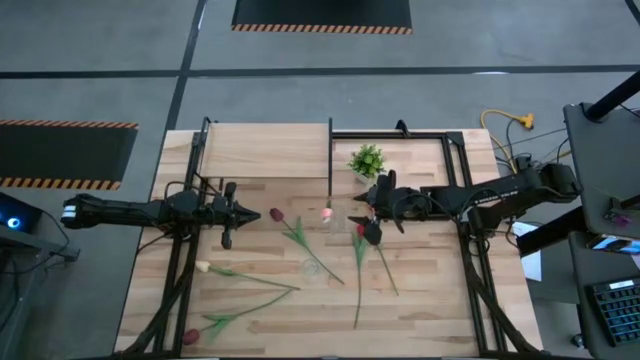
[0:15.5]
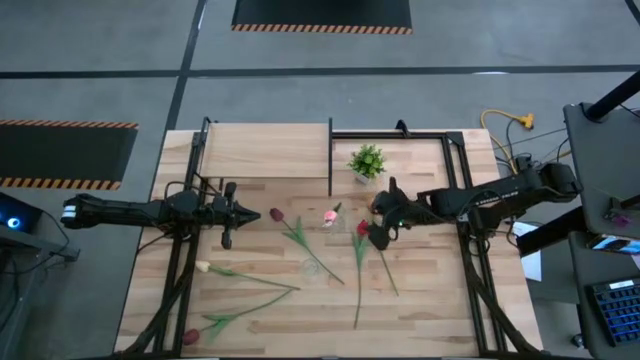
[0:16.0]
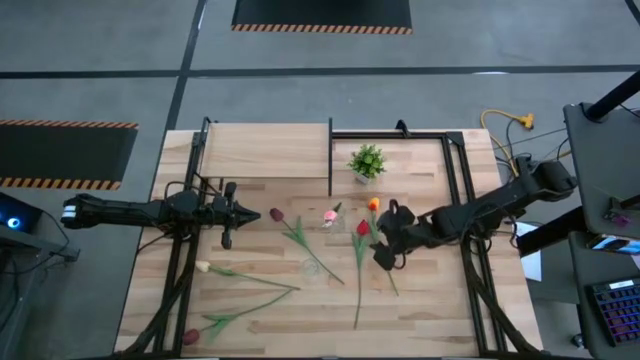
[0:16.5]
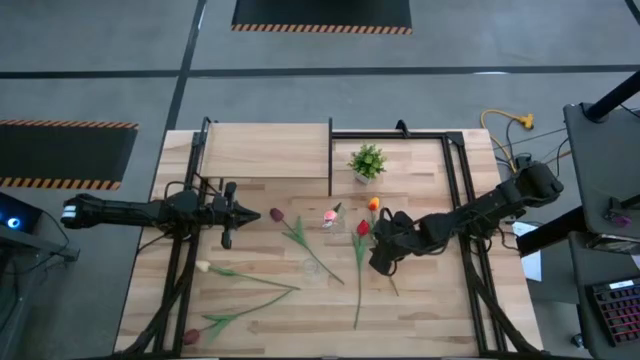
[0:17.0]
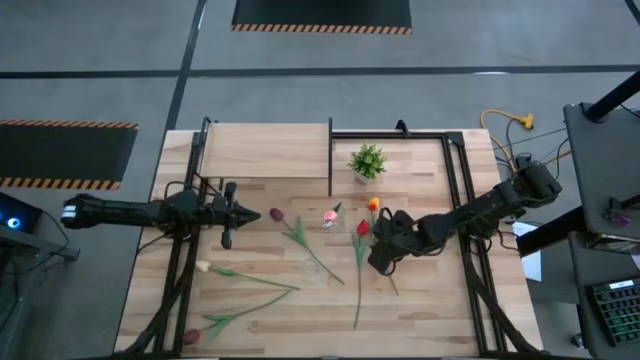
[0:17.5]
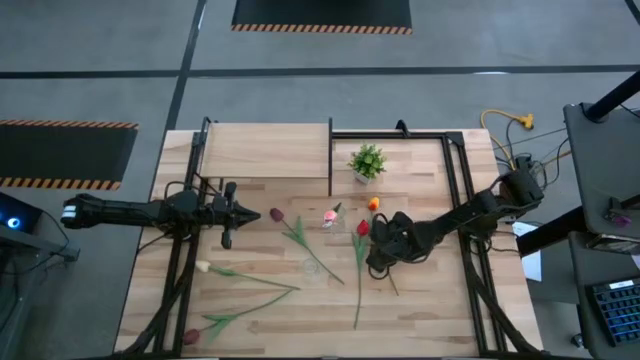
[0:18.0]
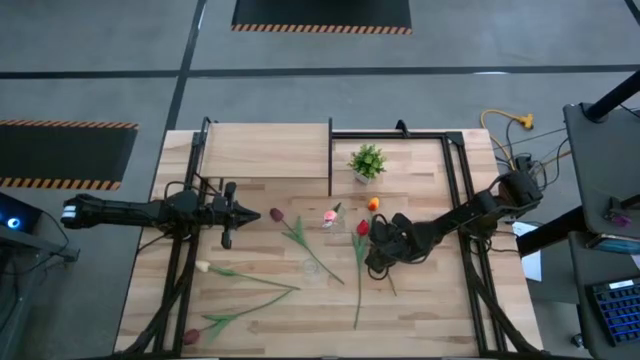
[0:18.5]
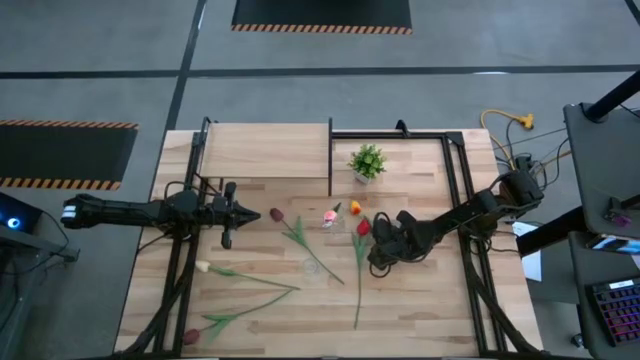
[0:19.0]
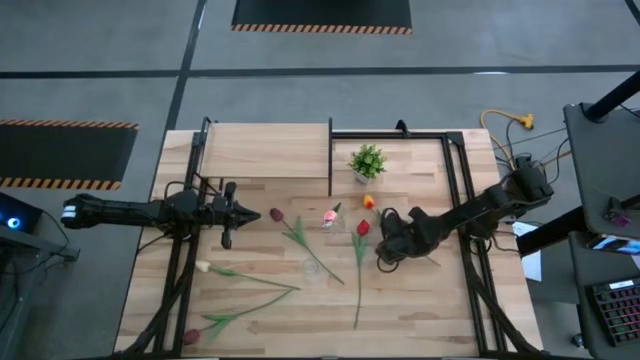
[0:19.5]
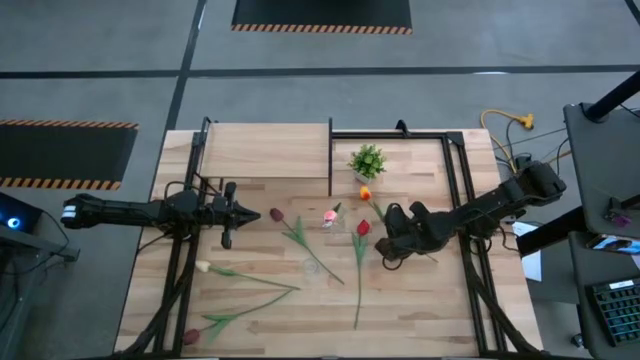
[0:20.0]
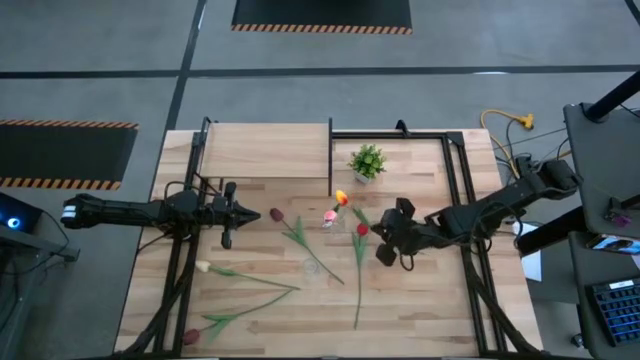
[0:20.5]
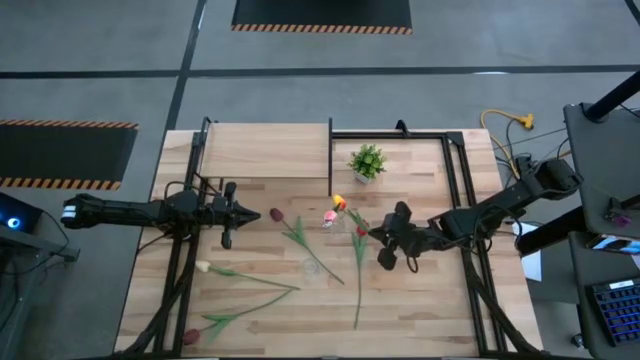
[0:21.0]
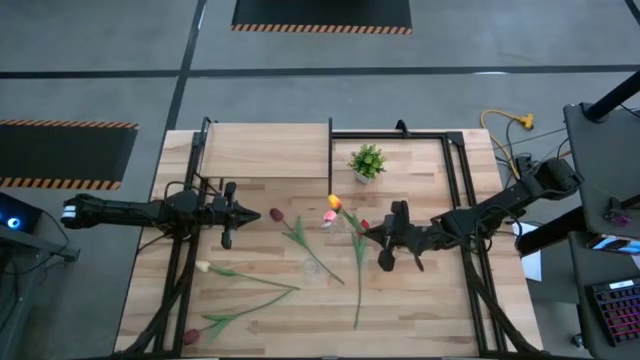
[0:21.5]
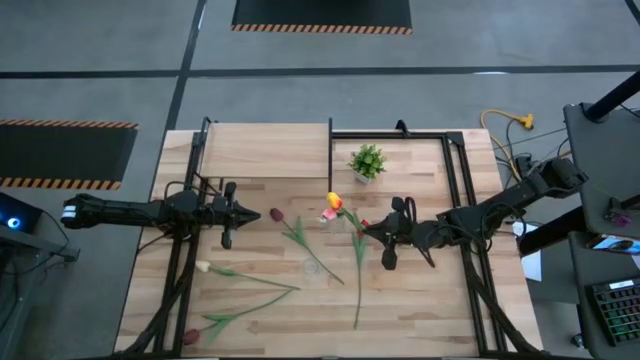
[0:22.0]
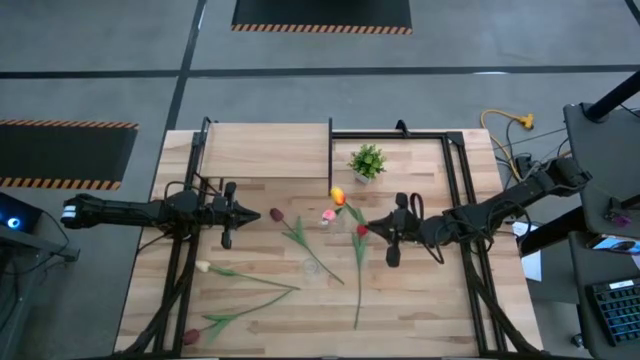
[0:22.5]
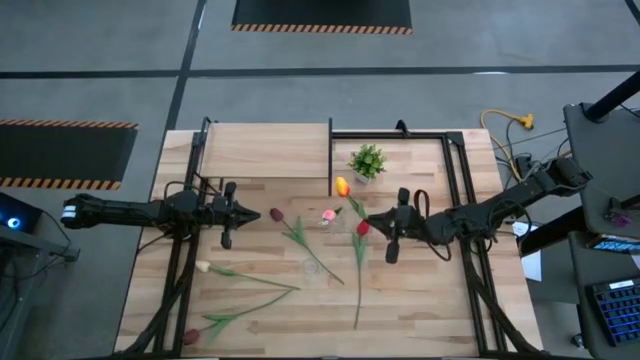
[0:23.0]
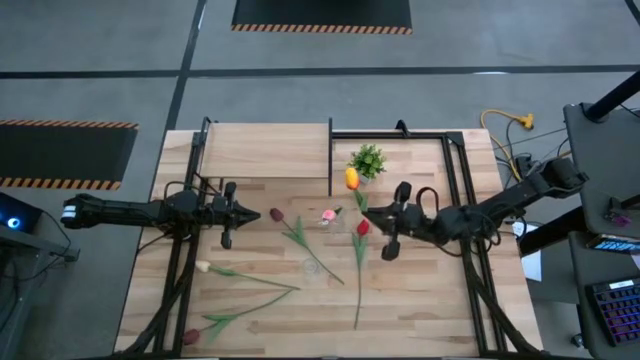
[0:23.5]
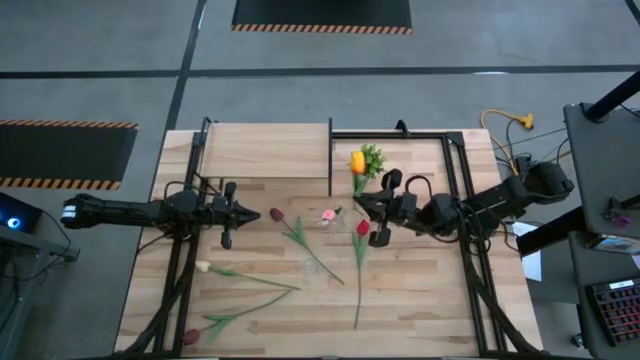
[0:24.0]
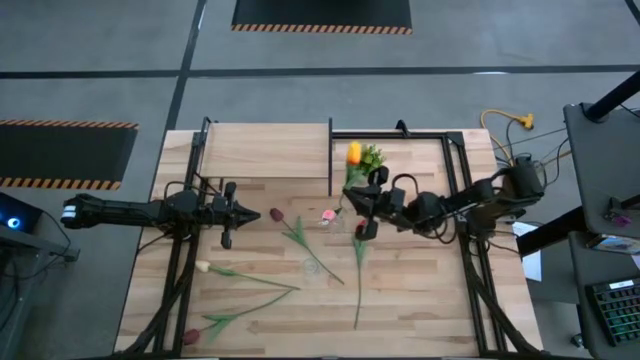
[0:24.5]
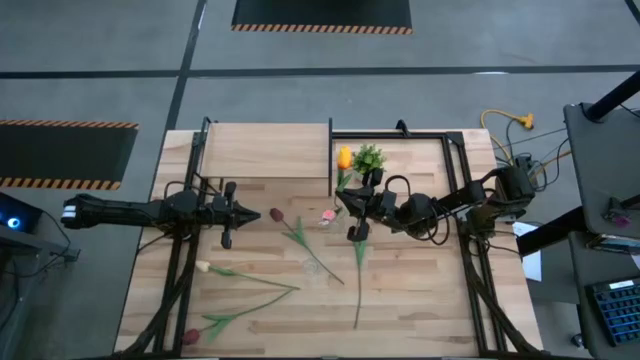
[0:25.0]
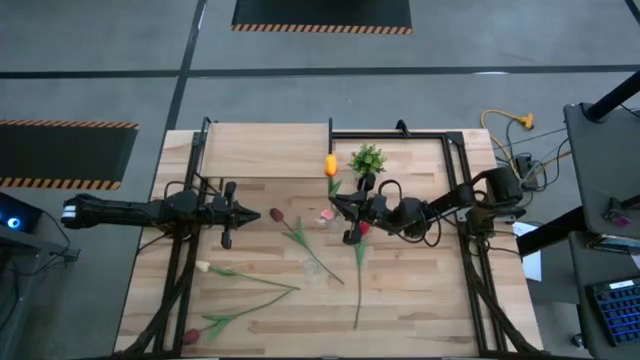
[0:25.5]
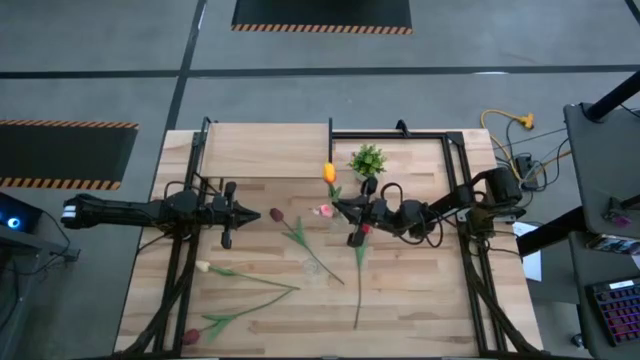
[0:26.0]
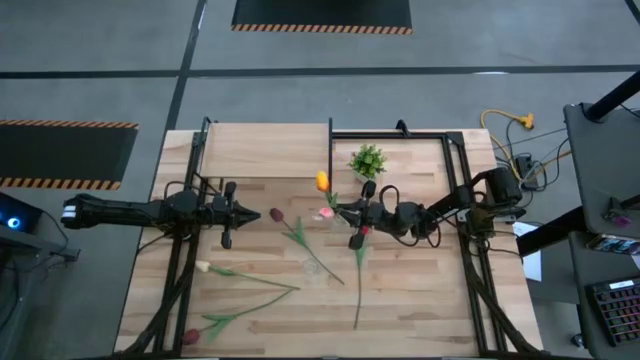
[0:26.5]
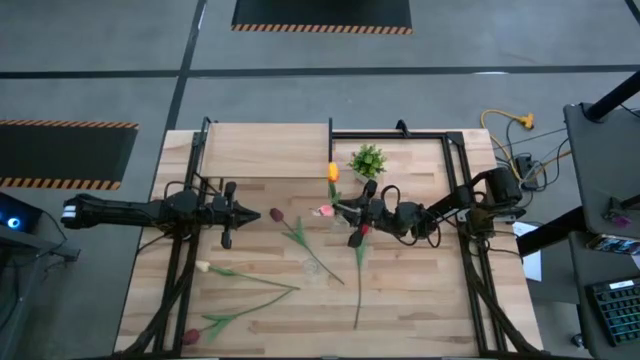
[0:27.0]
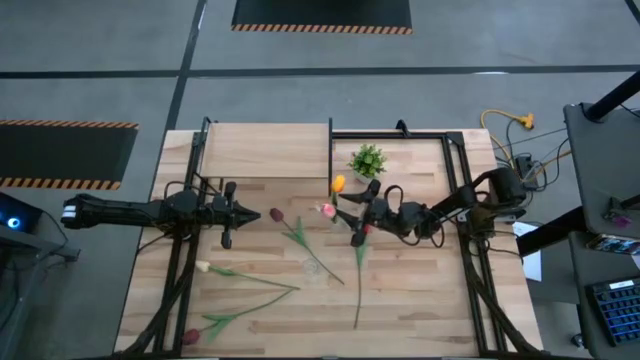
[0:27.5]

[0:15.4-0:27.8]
Task: Pick and place flowers into a vace then onto a shelf
Put the yellow tulip into the top transparent flower vase

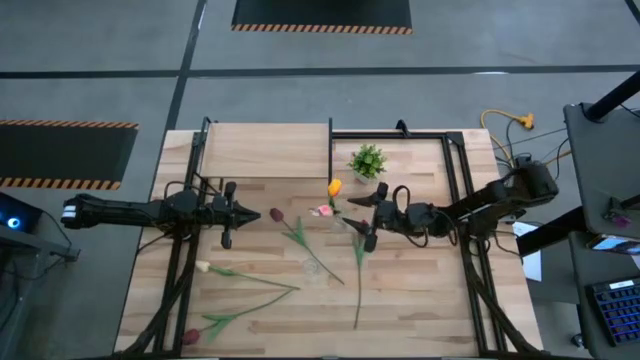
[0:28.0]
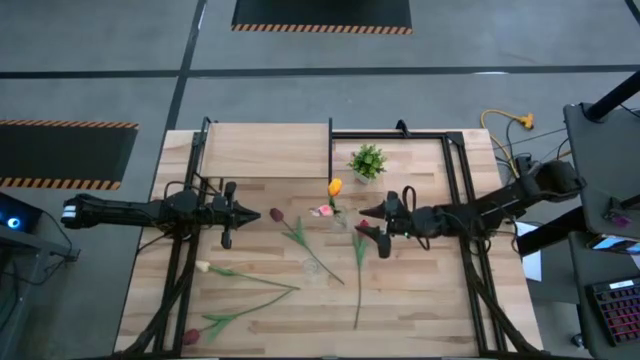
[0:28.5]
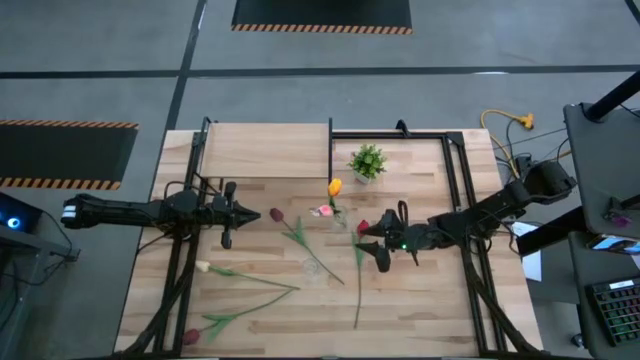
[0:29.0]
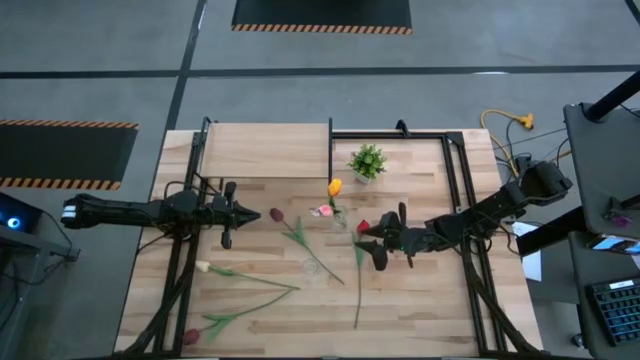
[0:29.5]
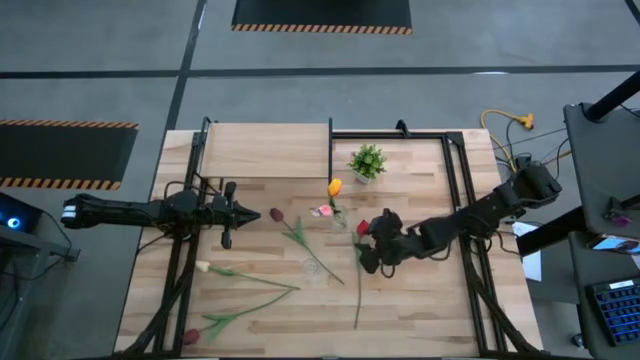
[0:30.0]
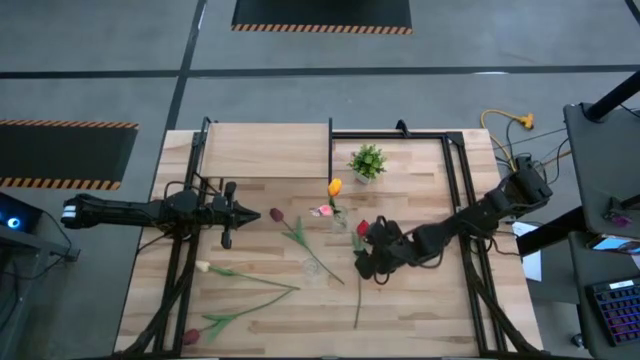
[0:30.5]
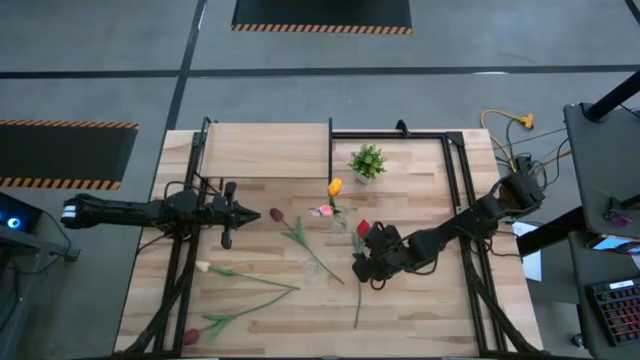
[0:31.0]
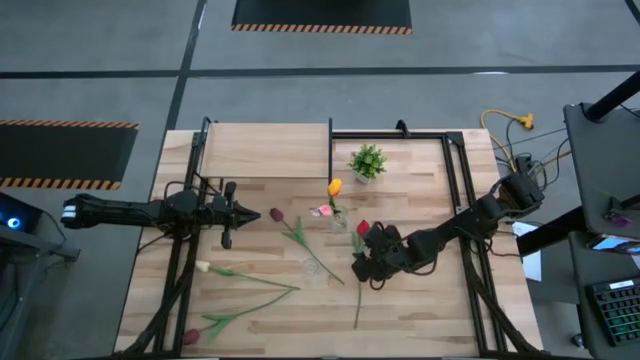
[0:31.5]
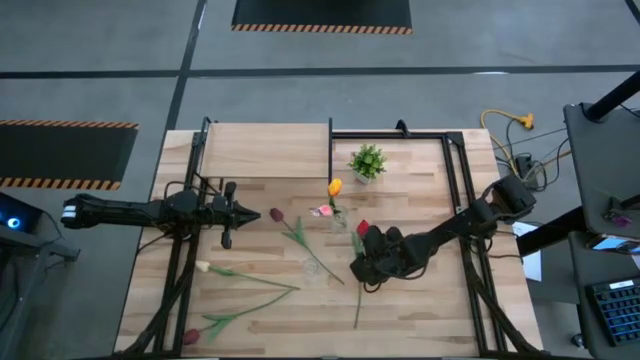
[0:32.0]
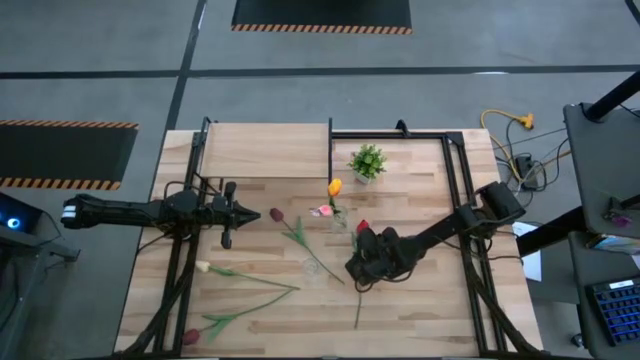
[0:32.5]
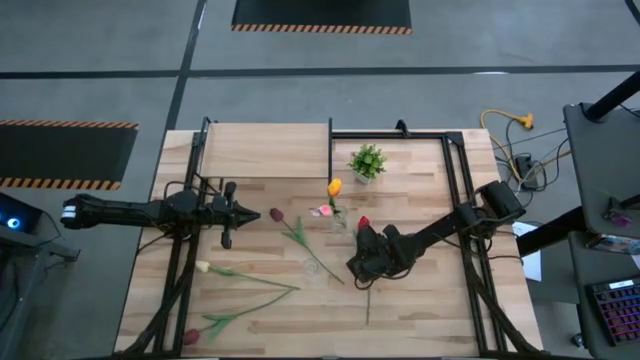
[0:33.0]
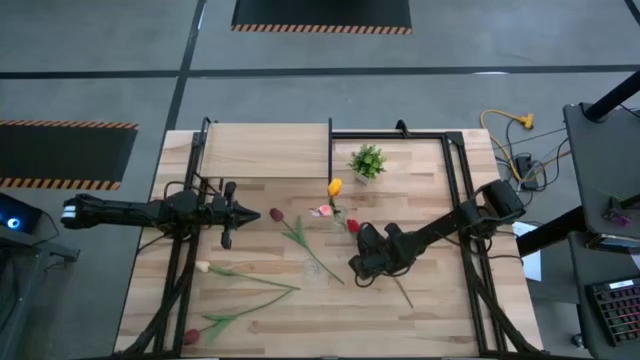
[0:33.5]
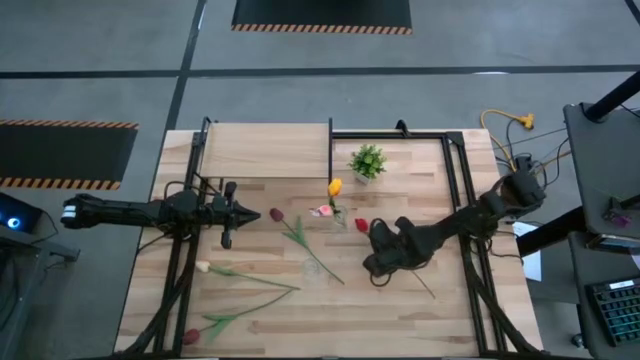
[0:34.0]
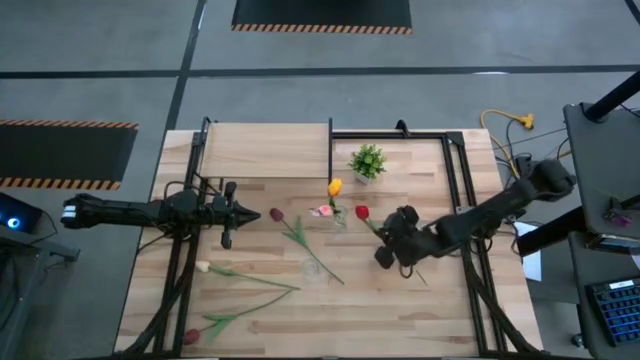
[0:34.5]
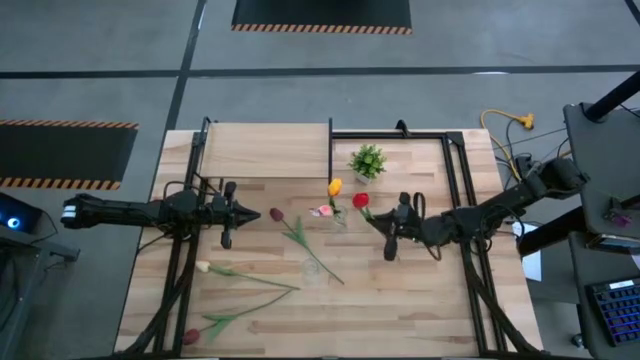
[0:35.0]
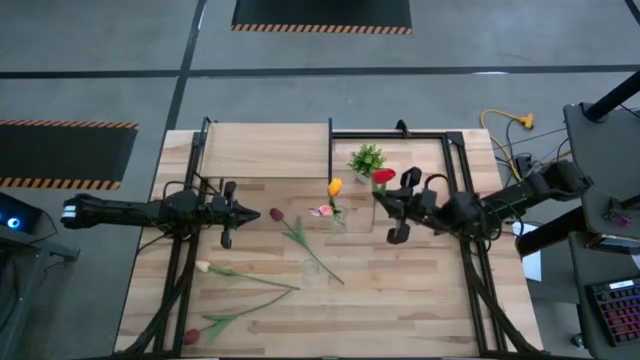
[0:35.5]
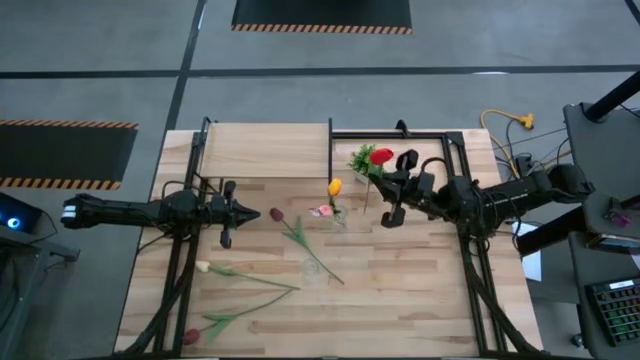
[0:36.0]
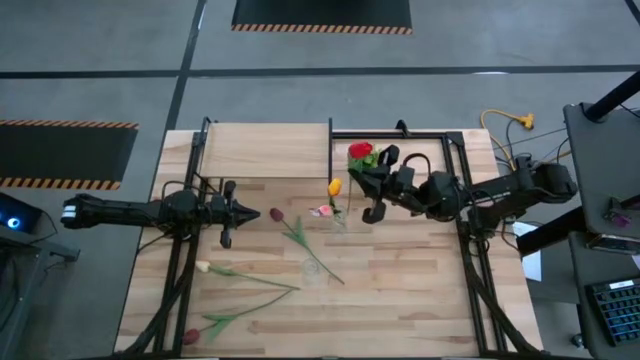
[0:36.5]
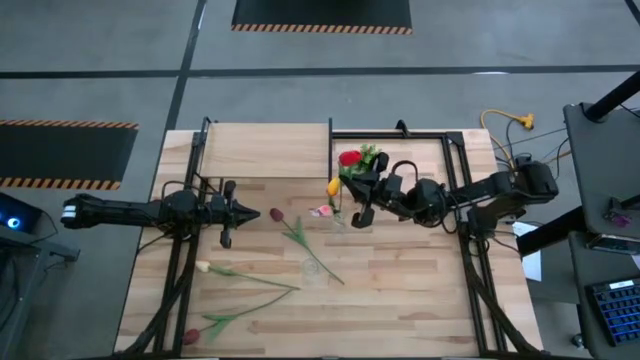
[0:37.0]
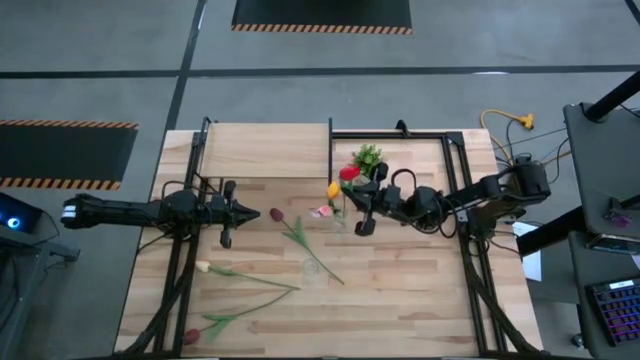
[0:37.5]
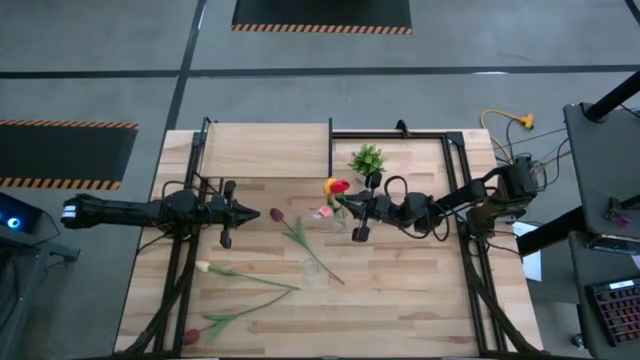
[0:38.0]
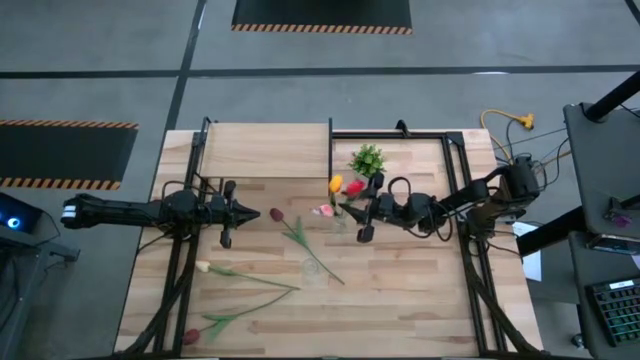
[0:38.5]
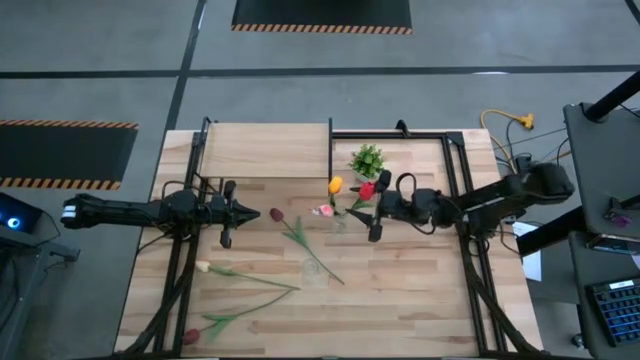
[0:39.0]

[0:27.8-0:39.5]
Put the red tulip into the top transparent flower vase
